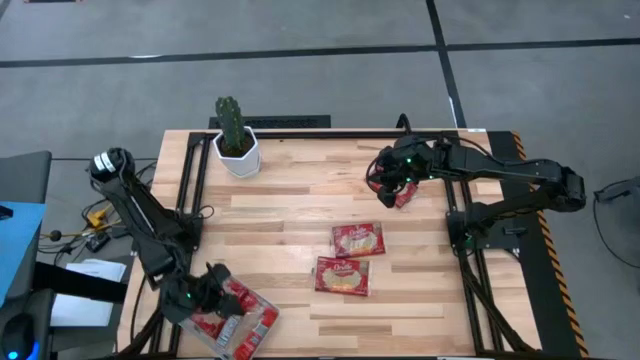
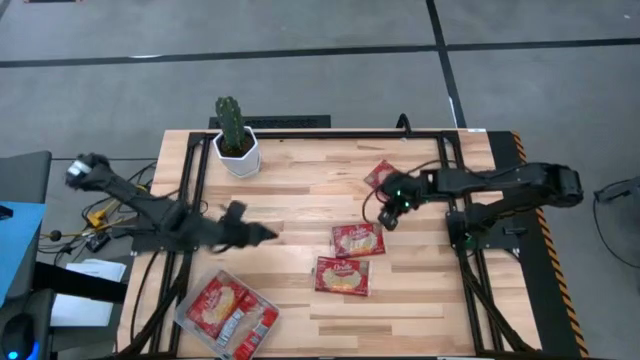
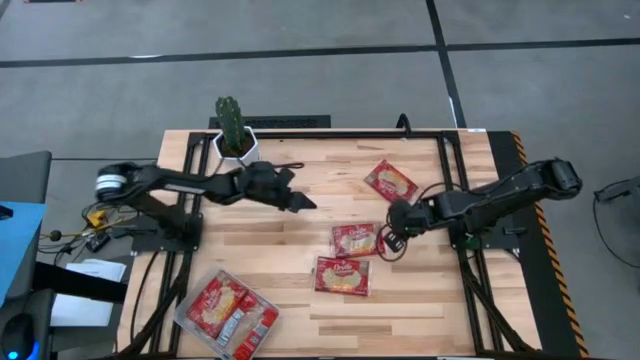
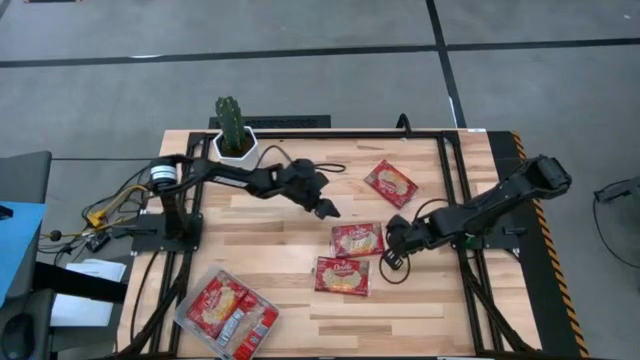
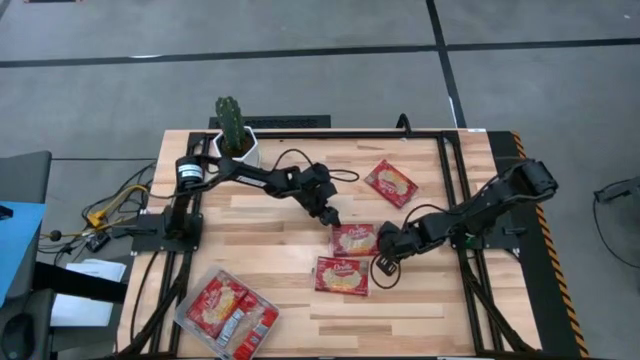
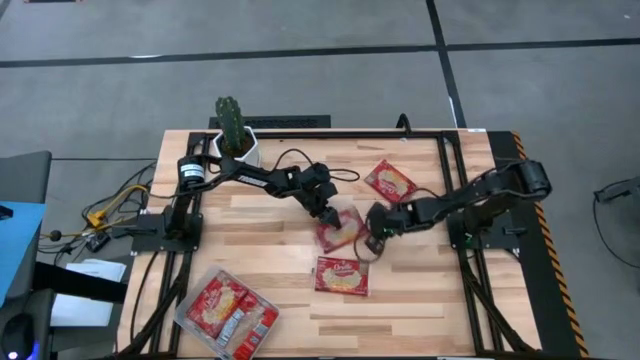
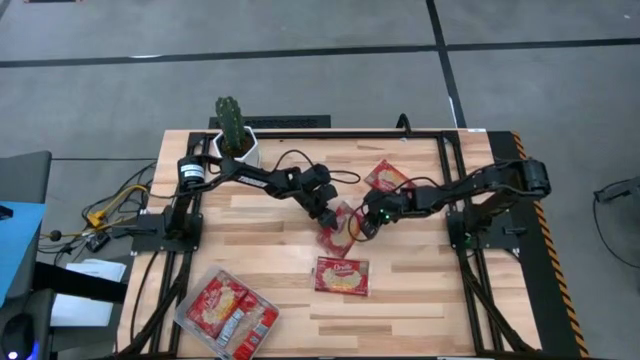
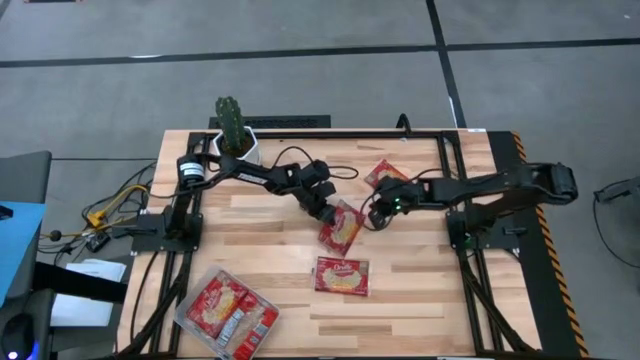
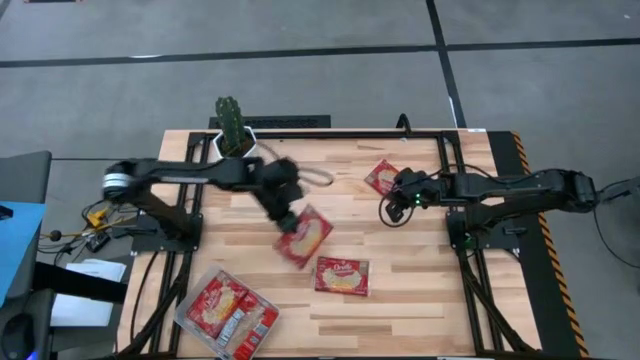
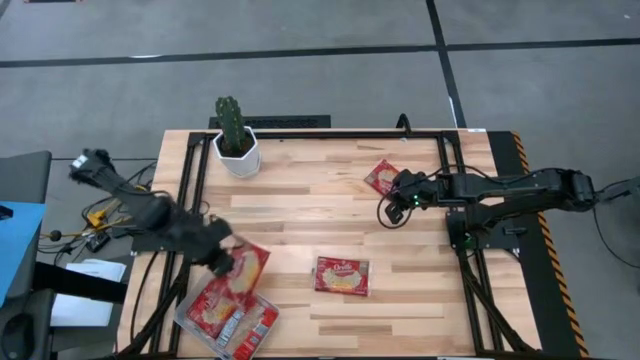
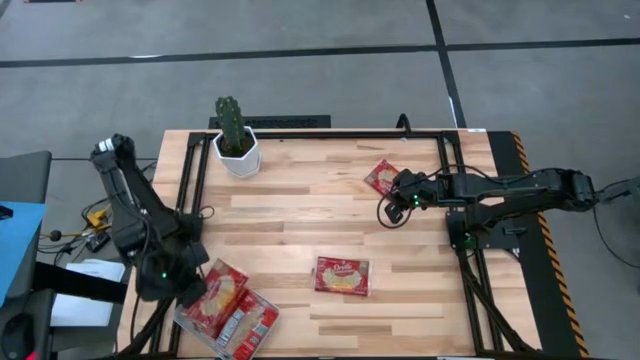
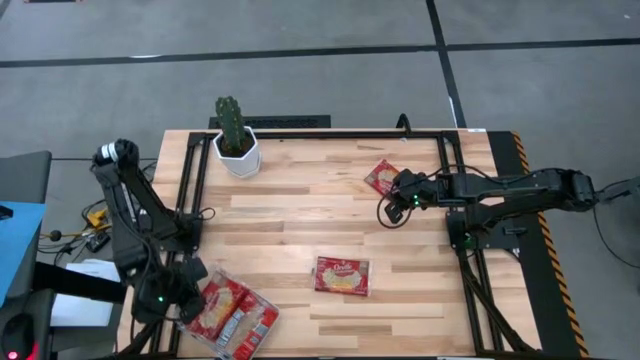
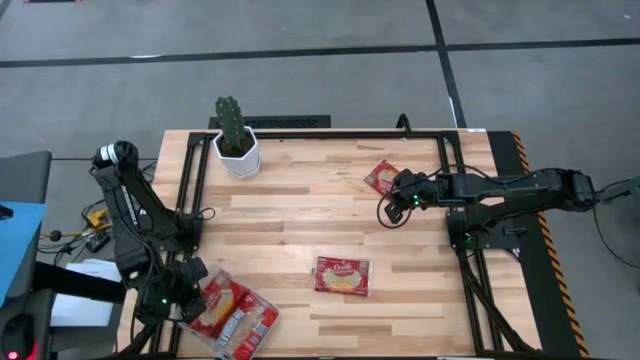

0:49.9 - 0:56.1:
Task: Sort popcorn bags into baskets
Put the red popcorn bag into the transparent bin

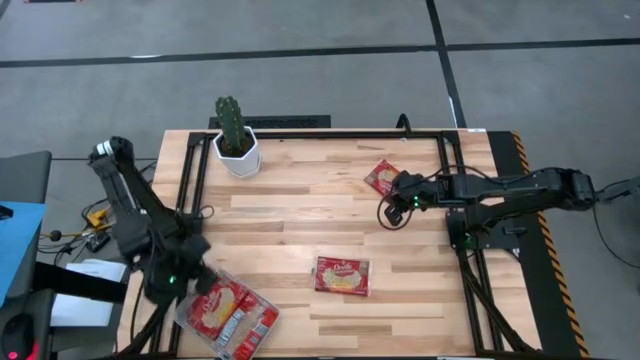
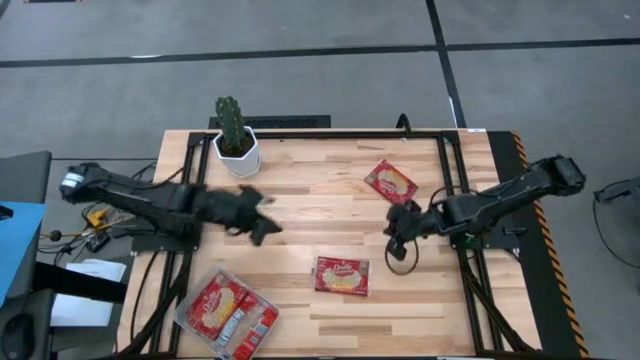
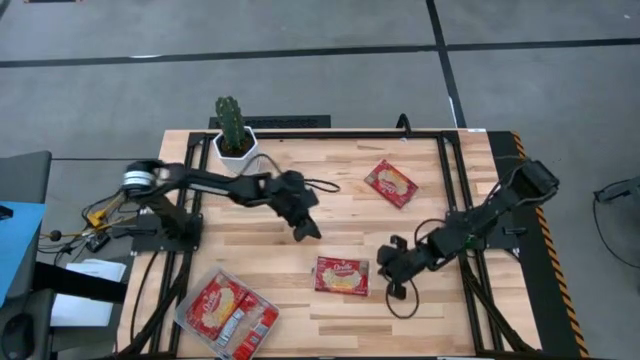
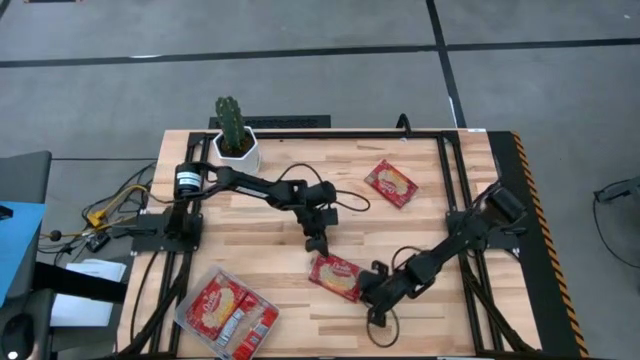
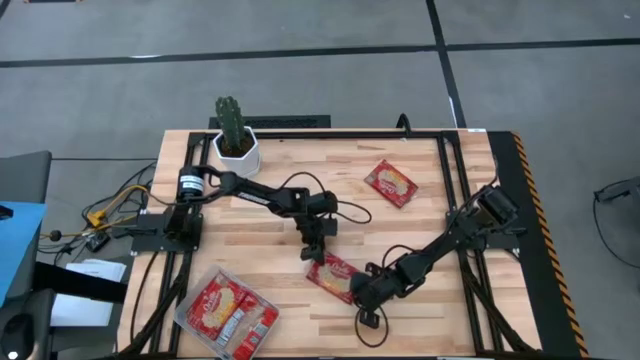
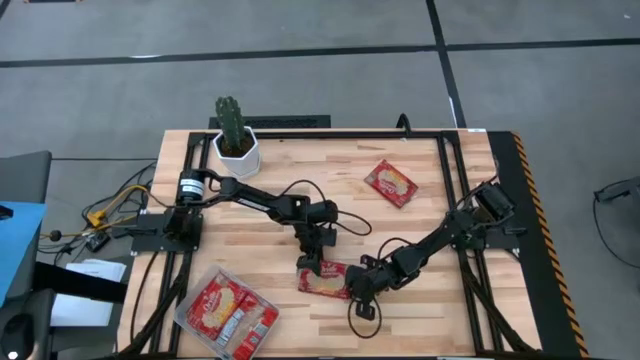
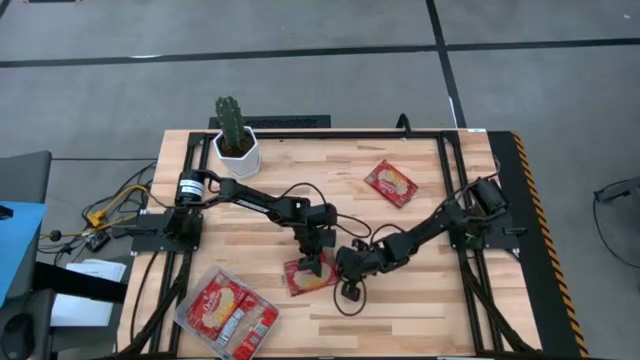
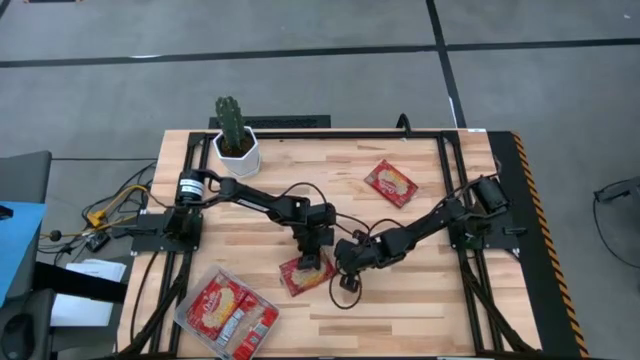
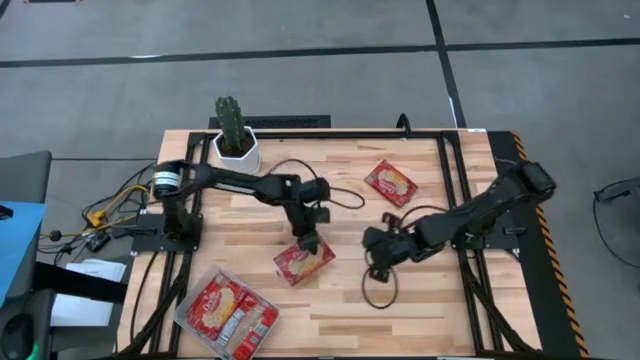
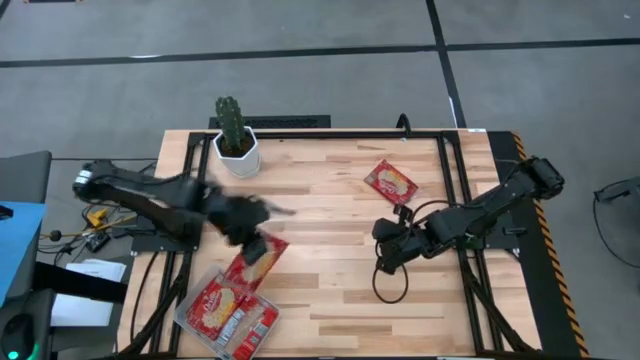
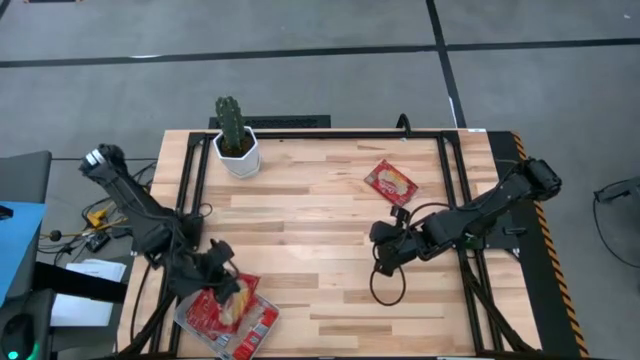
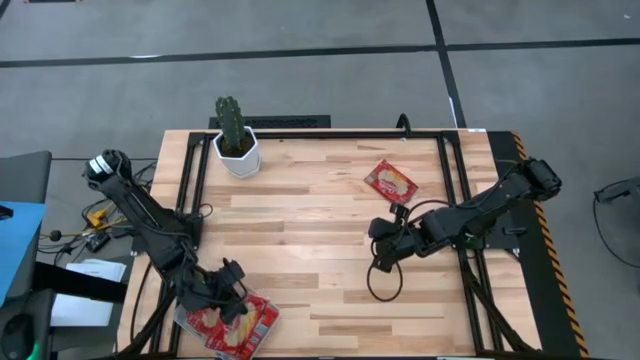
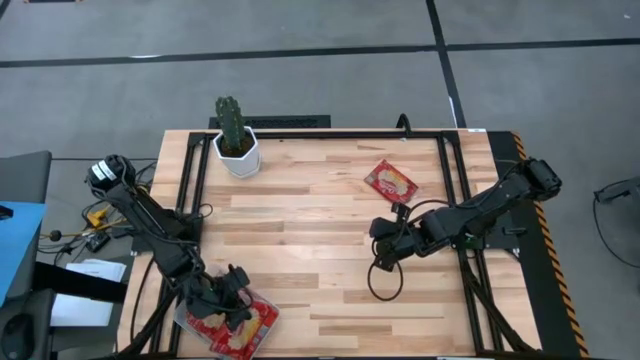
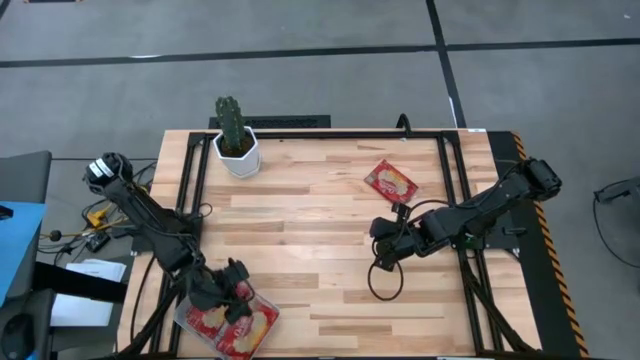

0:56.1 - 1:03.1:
Put the red popcorn bag into the transparent bin

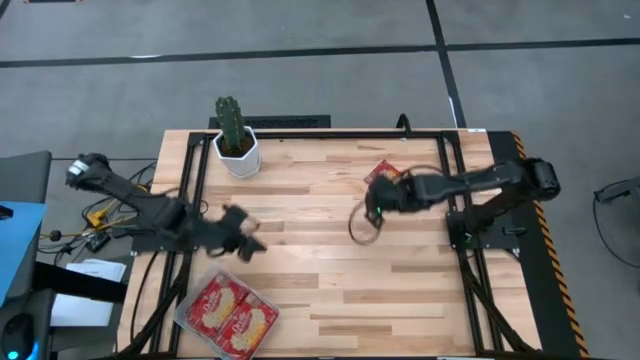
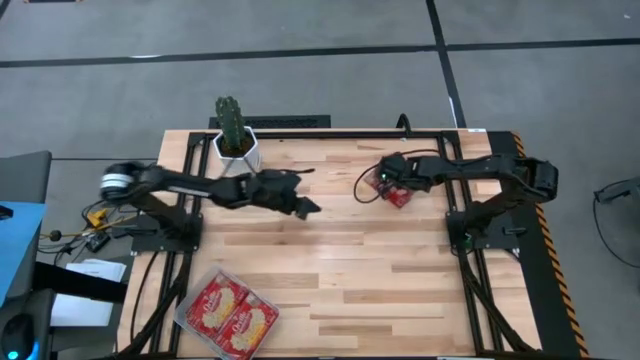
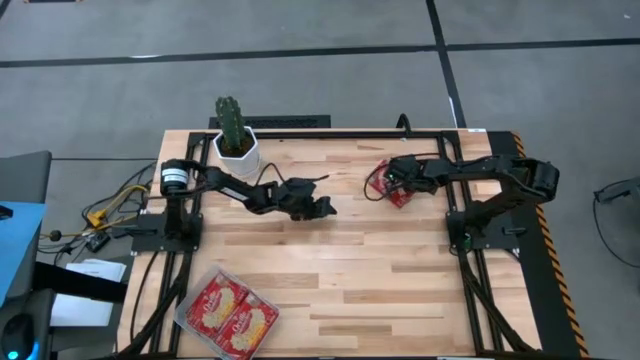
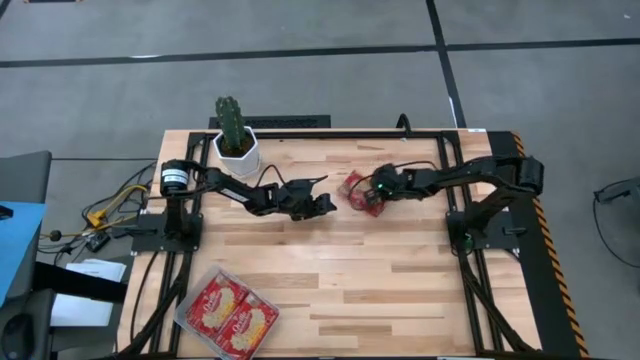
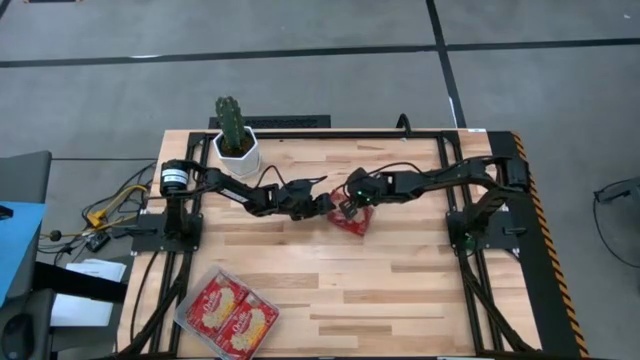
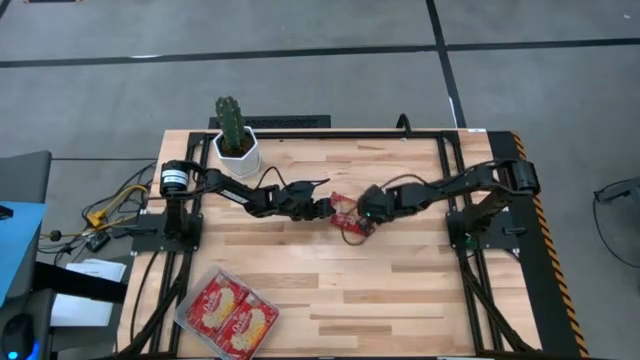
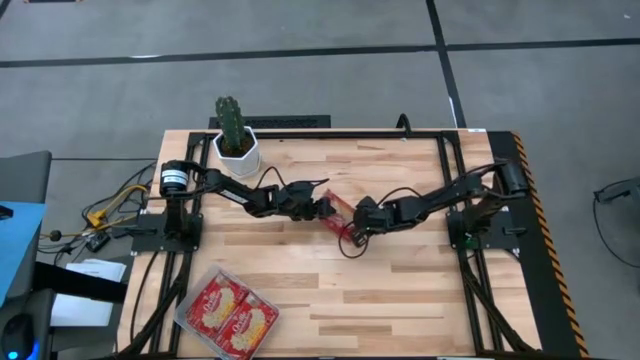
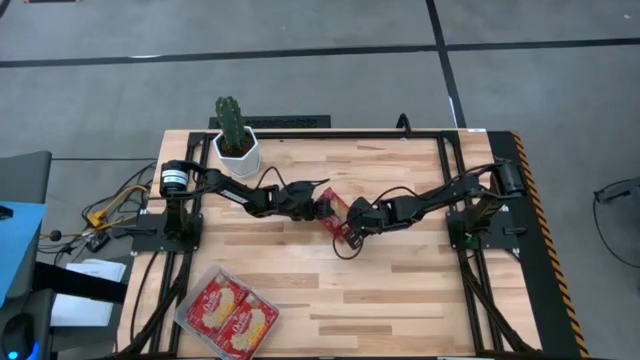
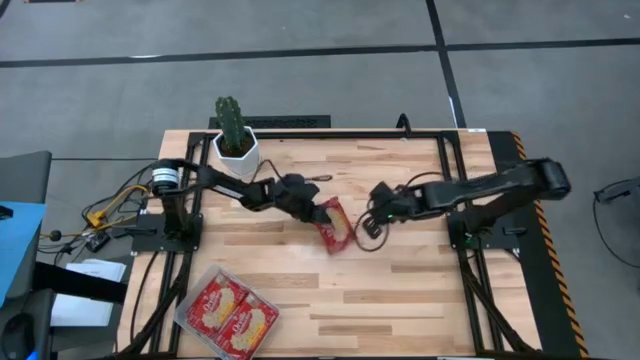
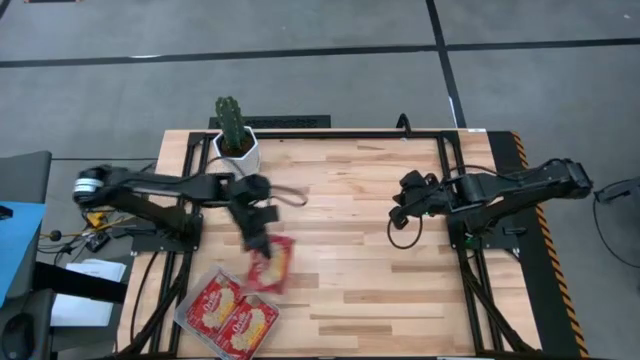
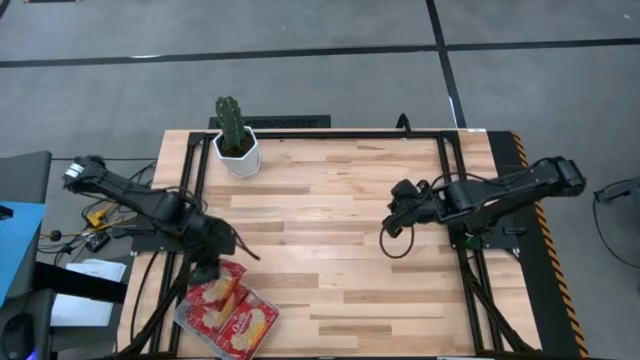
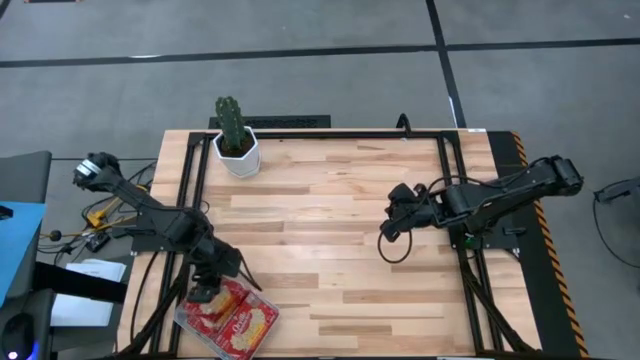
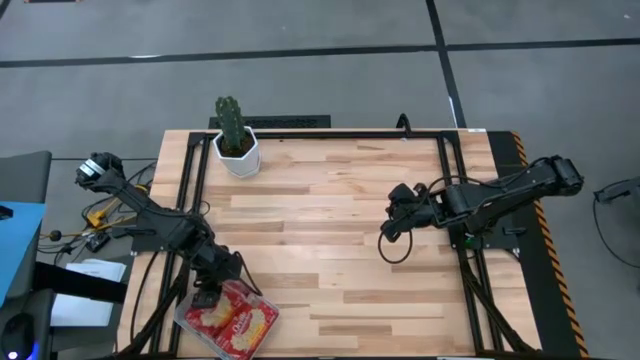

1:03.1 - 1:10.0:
Put the red popcorn bag into the transparent bin

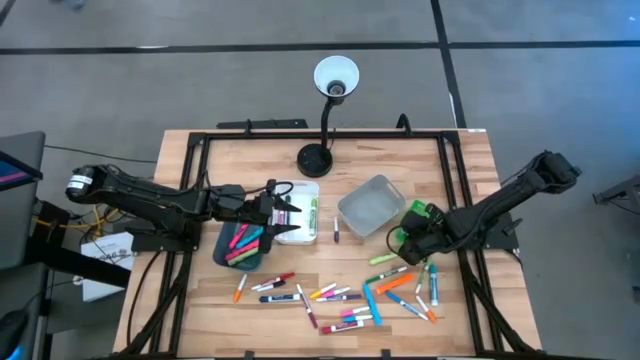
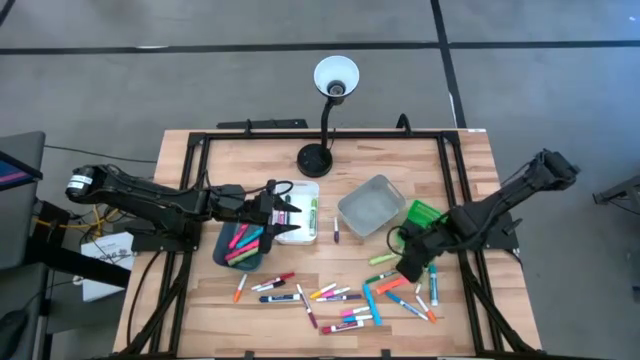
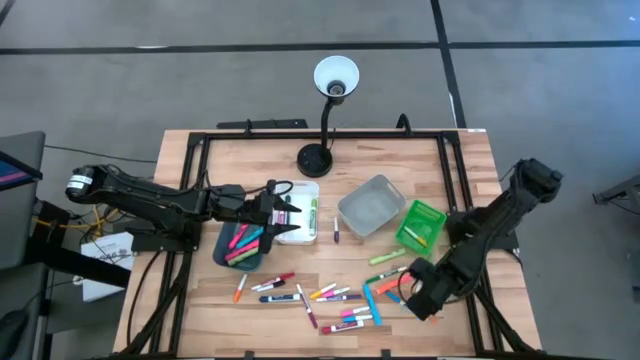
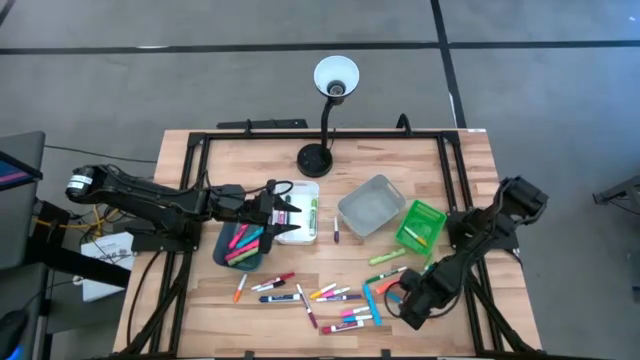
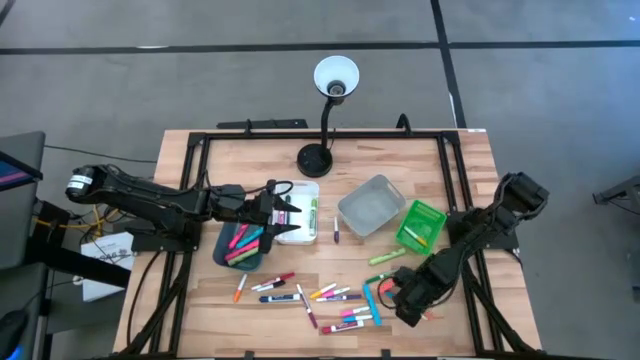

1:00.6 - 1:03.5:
Task: Pick & Place Markers
Put the right orange mini marker into the green bin
